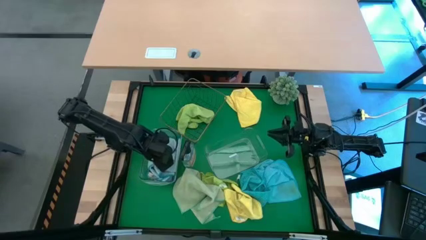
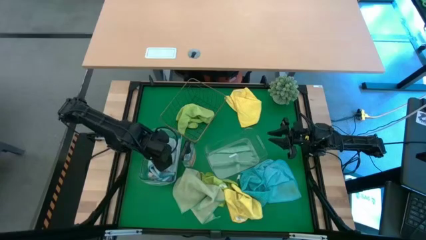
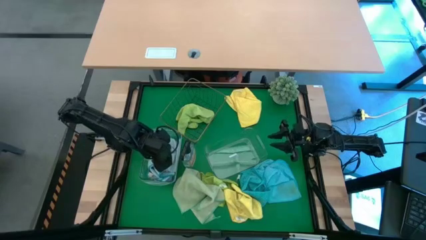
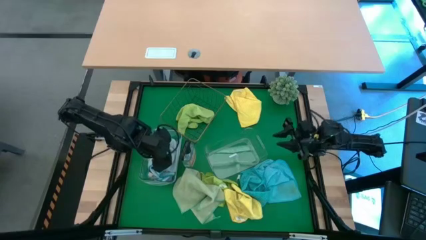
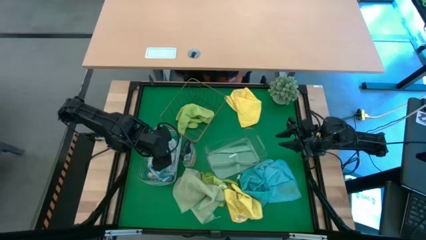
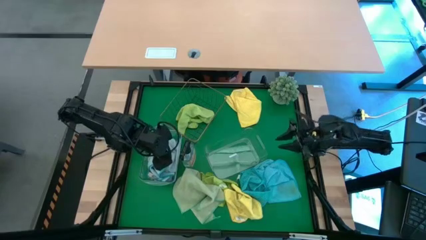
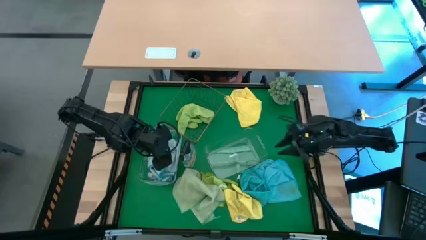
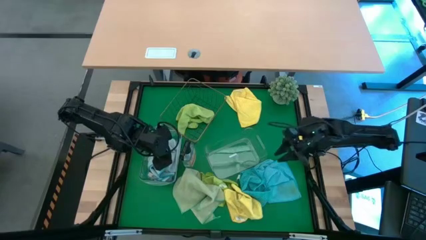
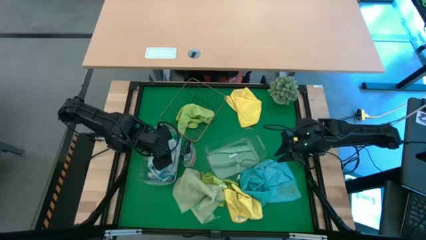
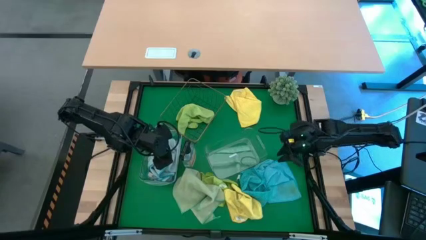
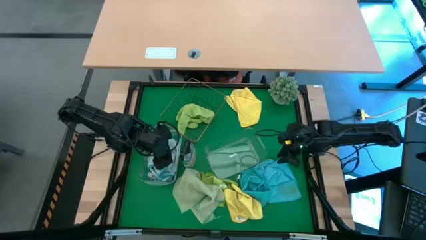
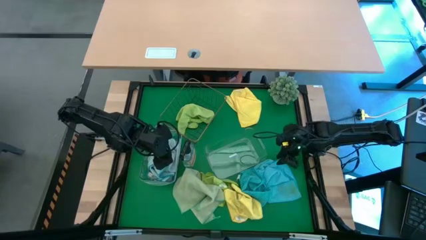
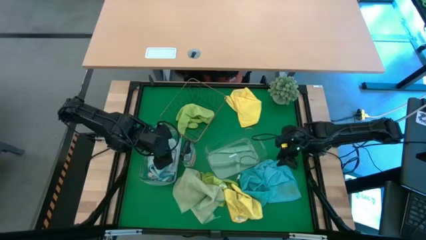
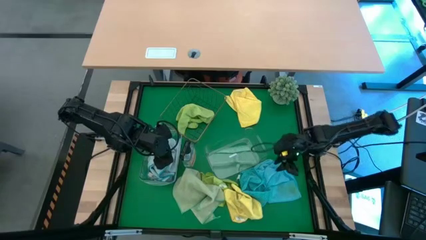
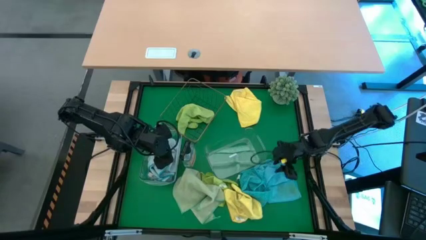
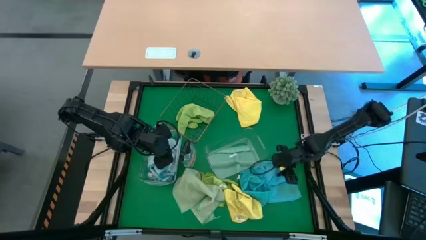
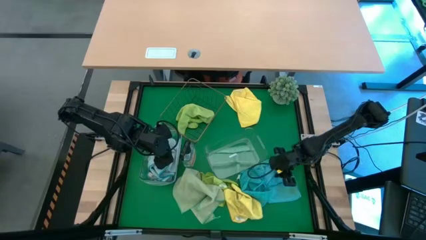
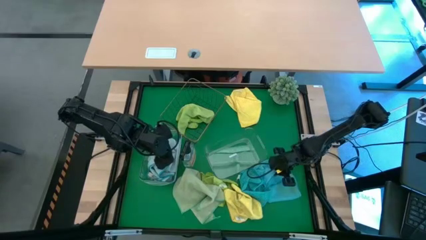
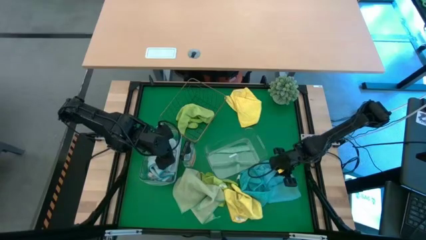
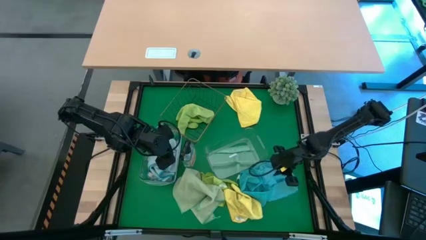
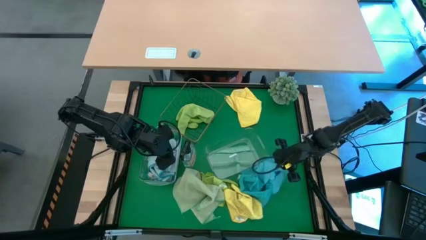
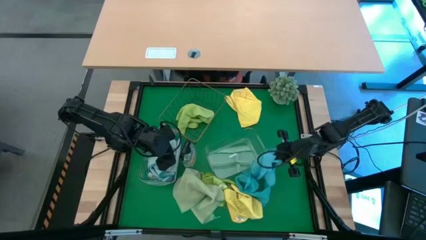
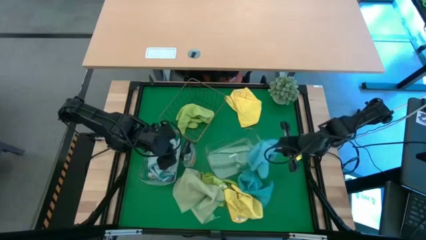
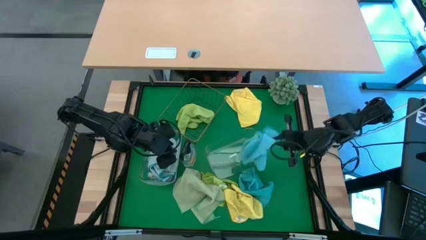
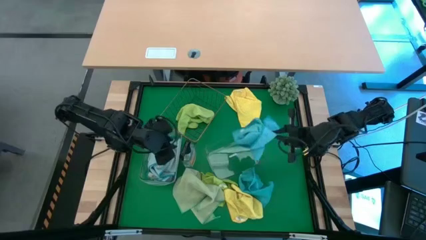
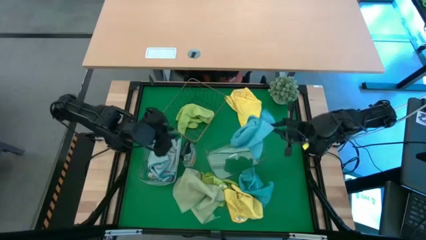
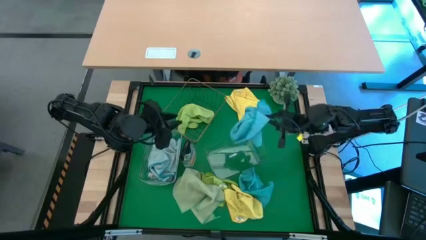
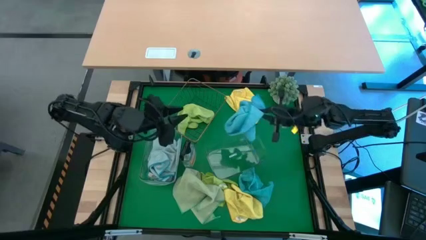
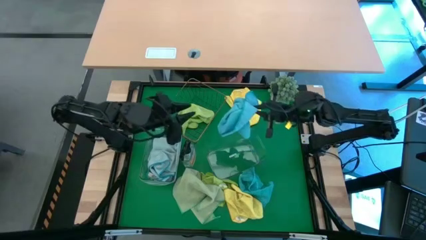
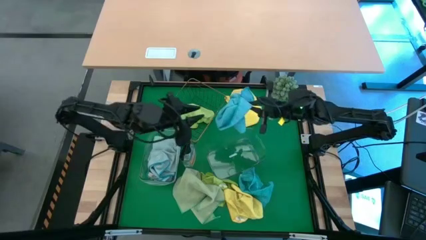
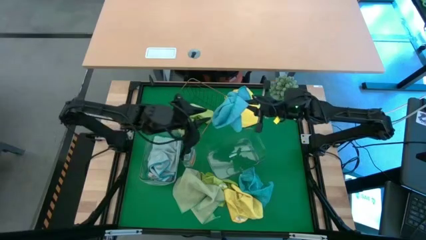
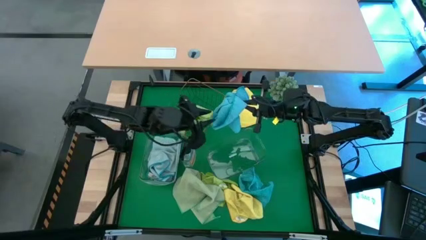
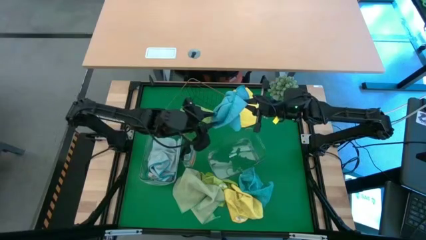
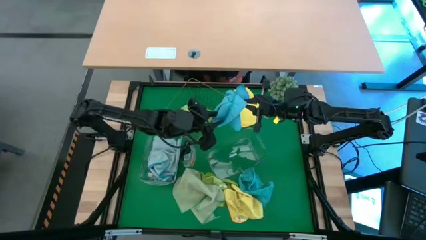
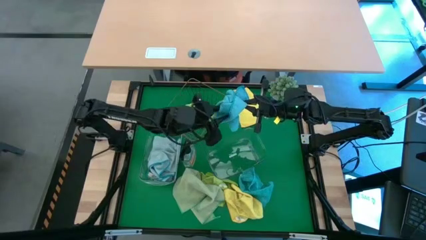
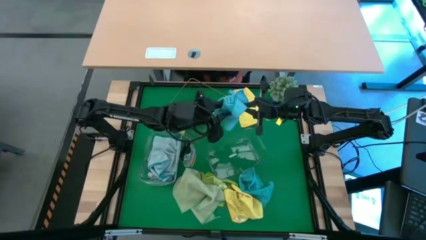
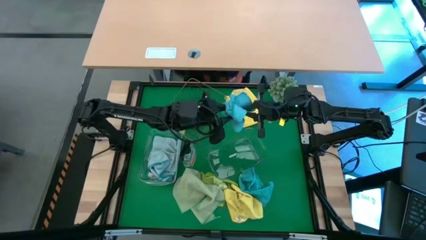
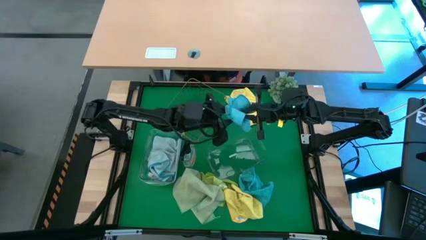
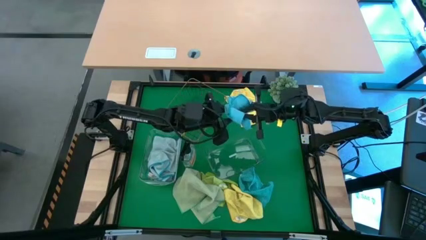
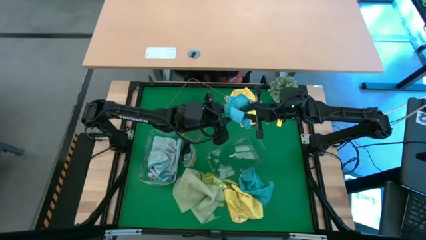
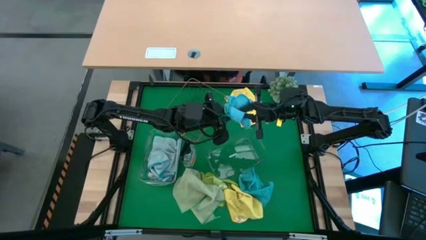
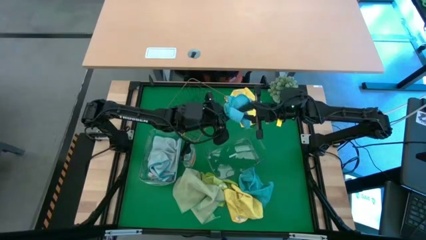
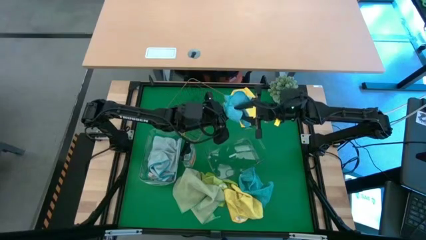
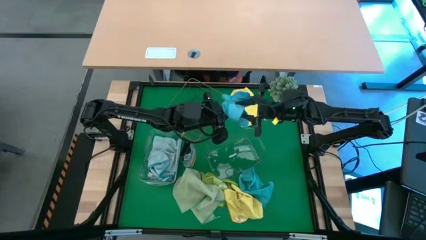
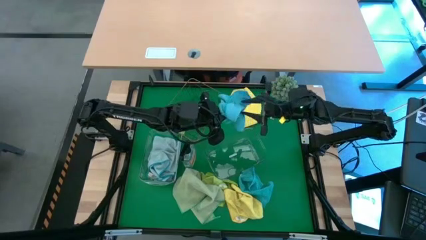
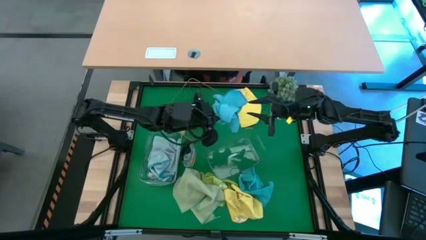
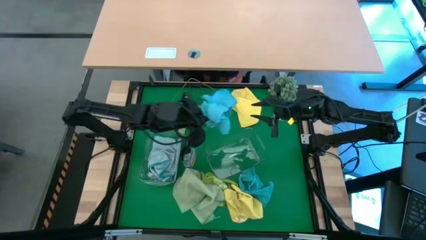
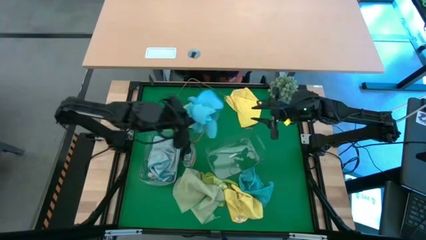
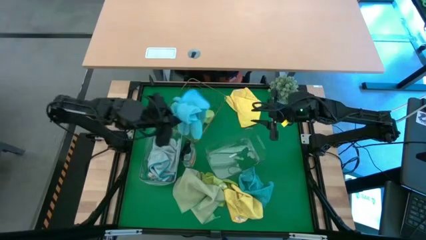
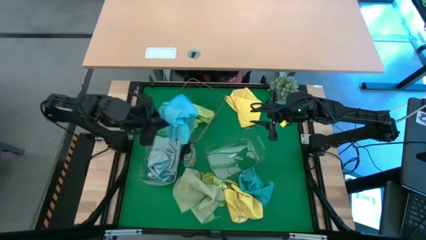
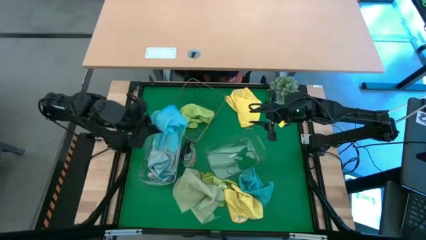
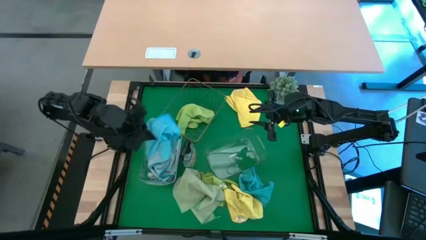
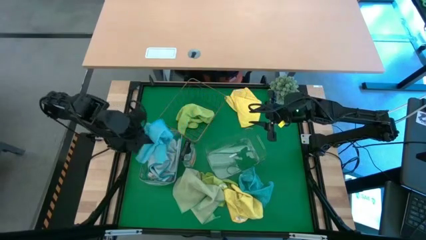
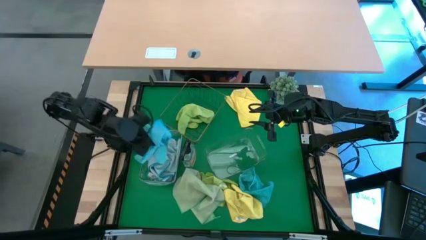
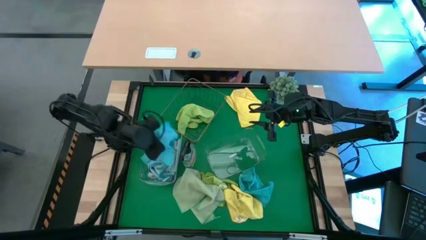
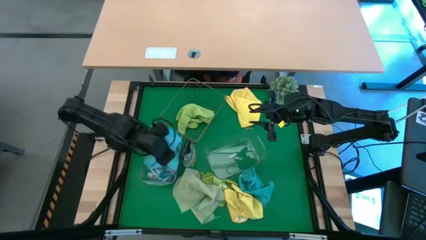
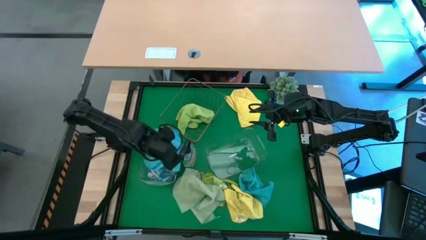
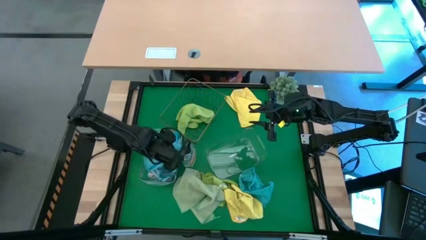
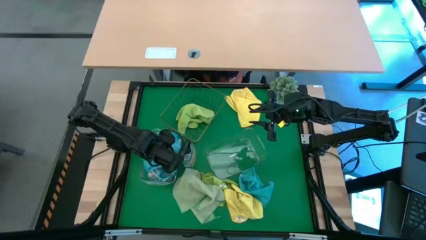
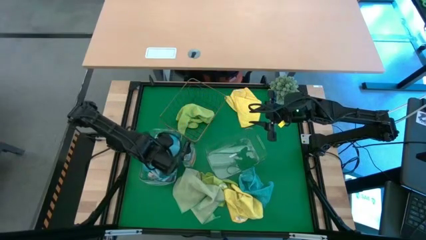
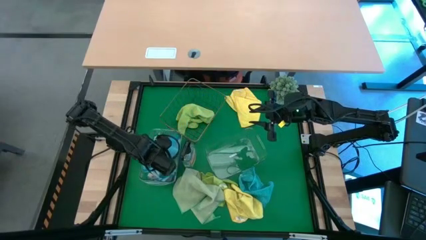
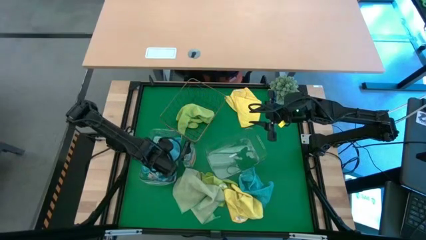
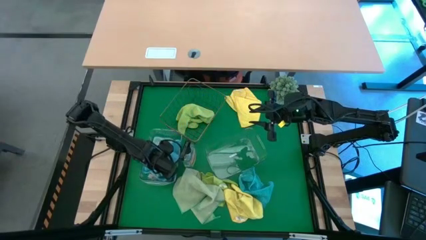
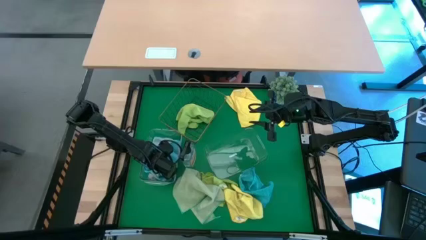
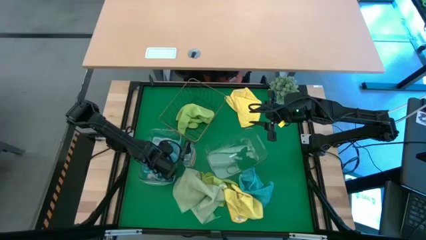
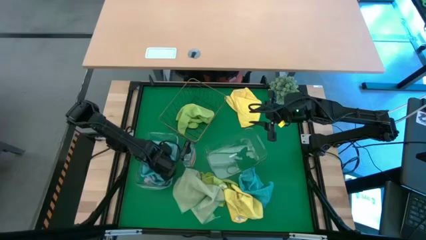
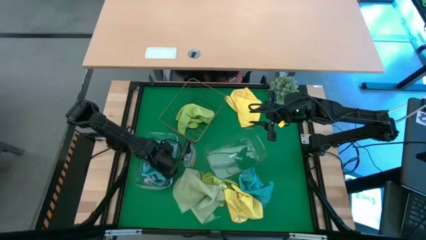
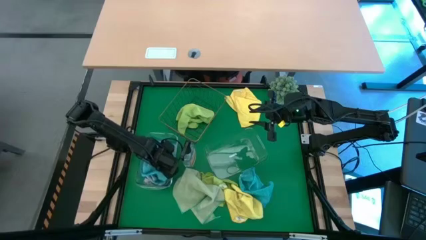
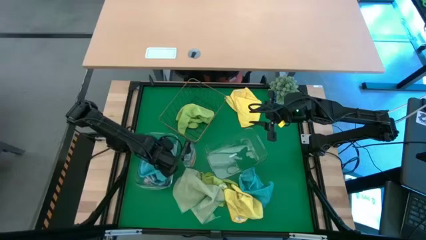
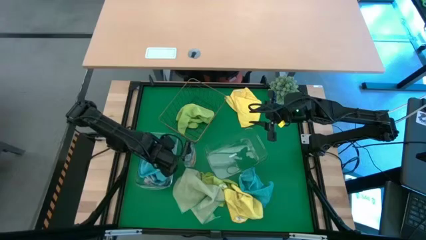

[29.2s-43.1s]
Task: Sort microfiber towel by color & place in baskets
Put the right dark blue microfiber towel into the left transparent bin

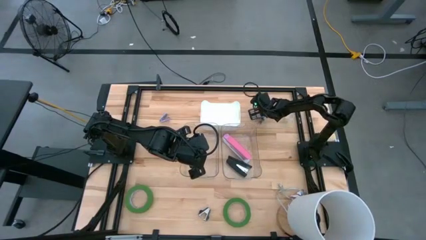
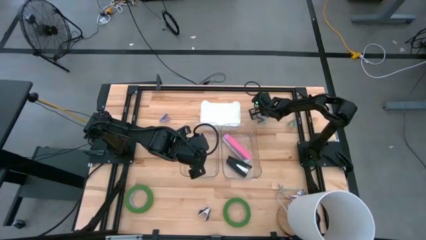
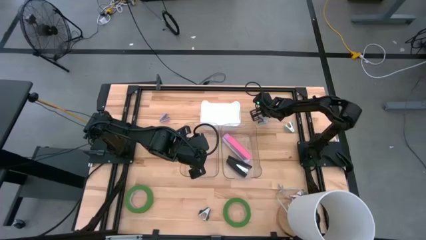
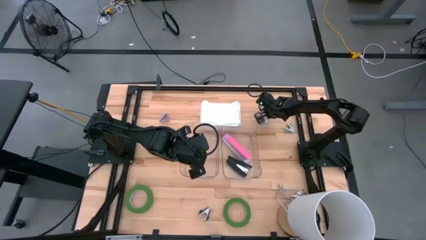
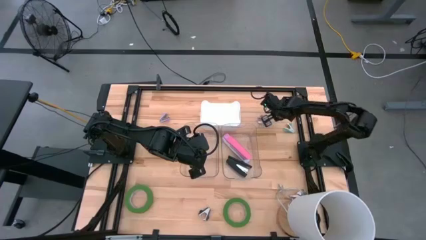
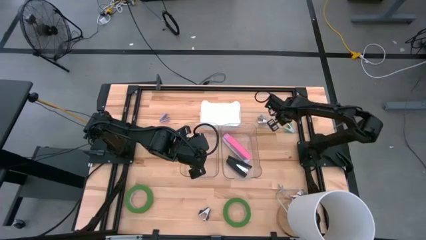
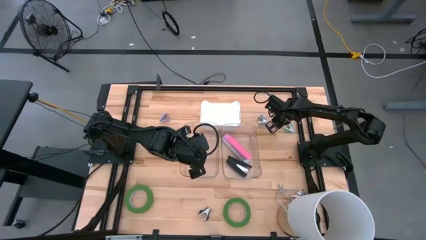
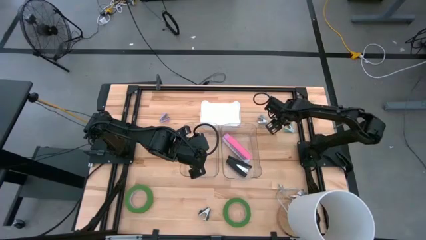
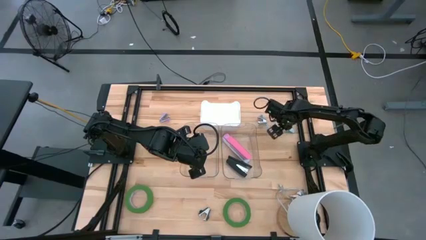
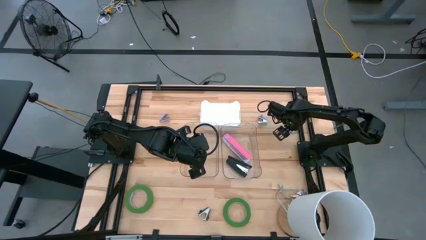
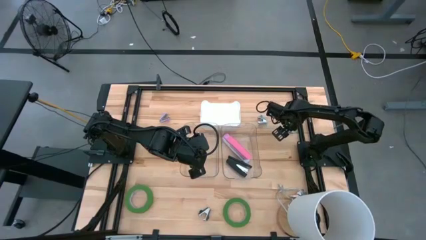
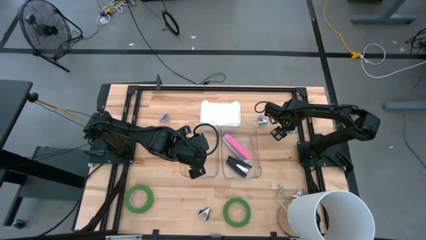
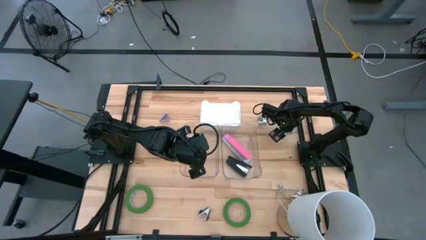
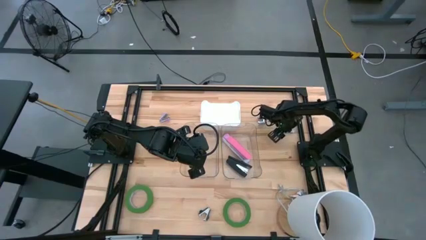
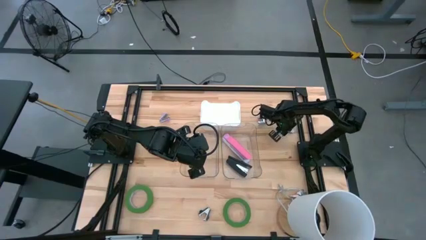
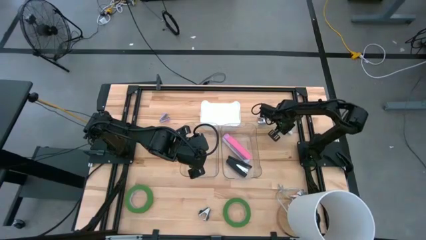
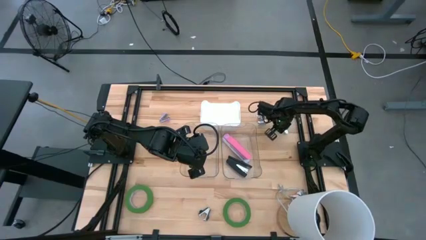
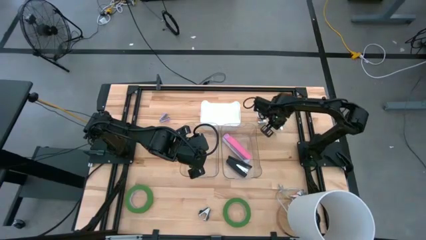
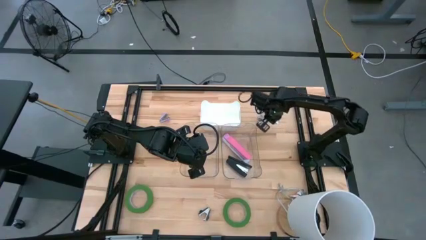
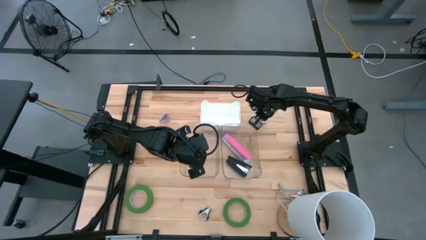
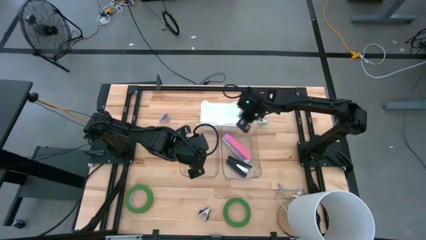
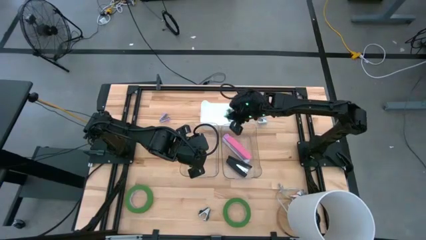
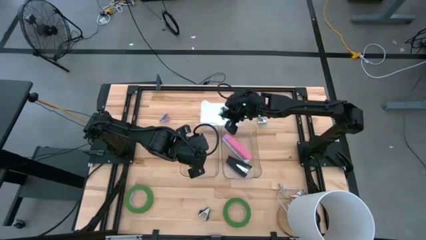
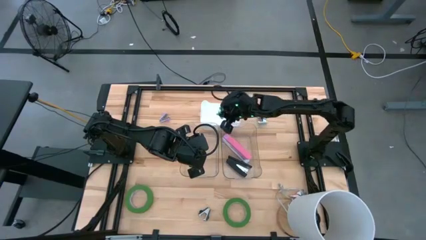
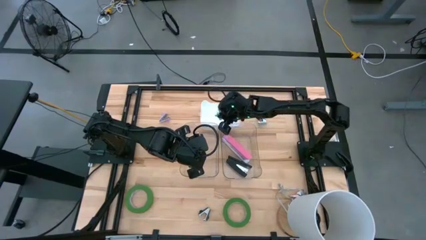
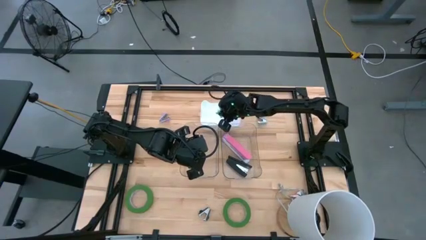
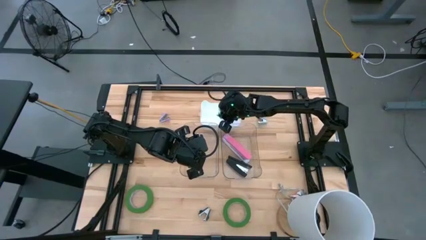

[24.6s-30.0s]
Task: Pick and place Stapler, Stapler remover, tape
Put the light blue staple remover into the white bin
